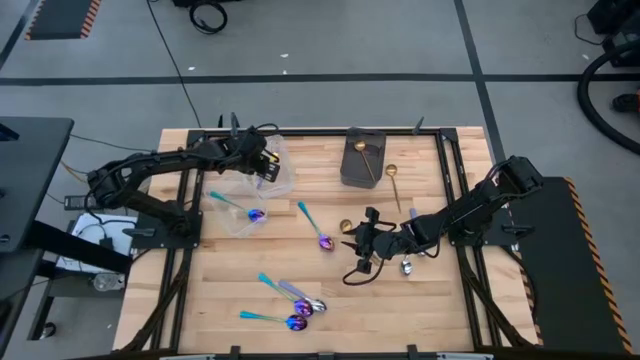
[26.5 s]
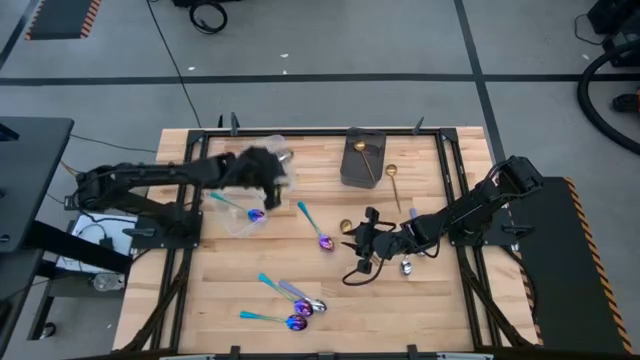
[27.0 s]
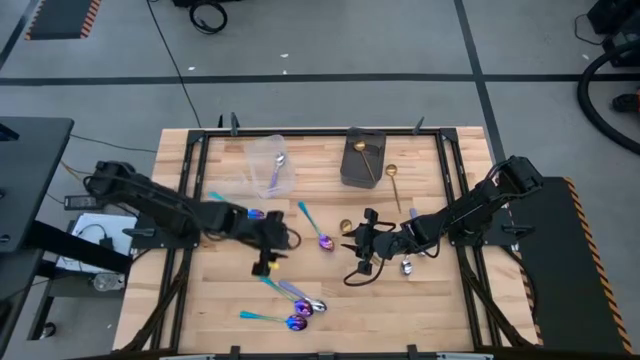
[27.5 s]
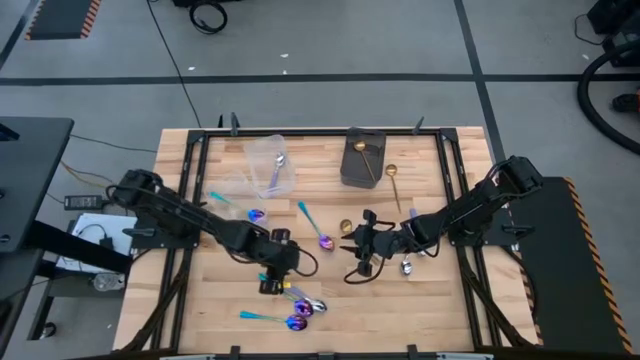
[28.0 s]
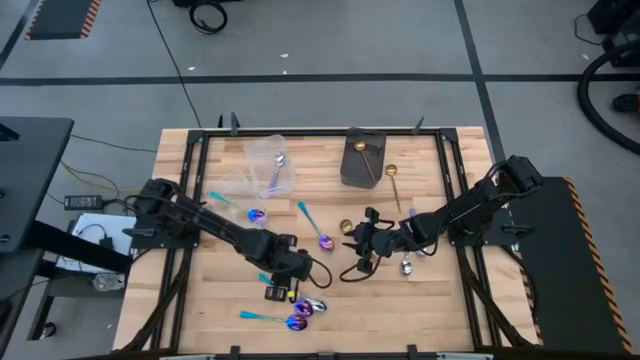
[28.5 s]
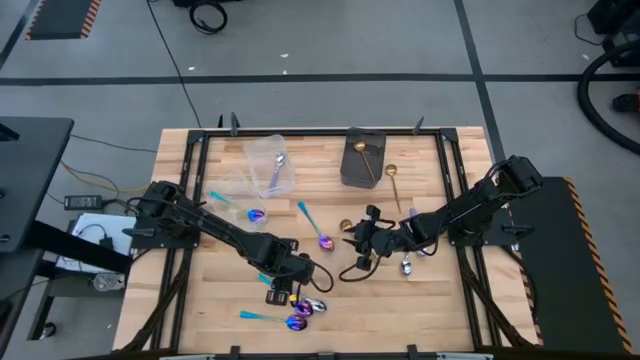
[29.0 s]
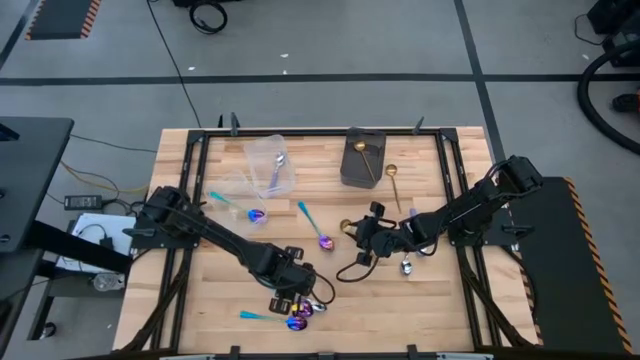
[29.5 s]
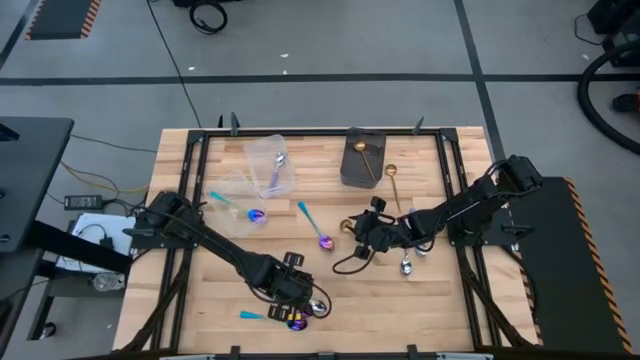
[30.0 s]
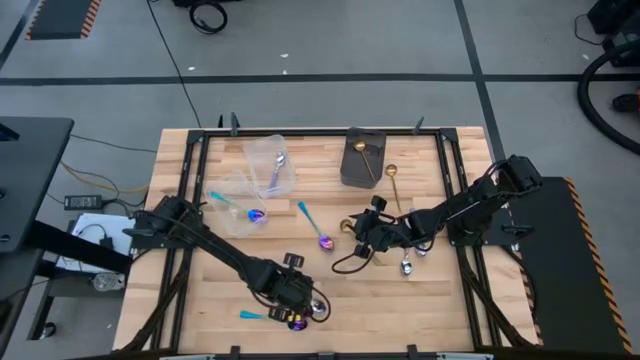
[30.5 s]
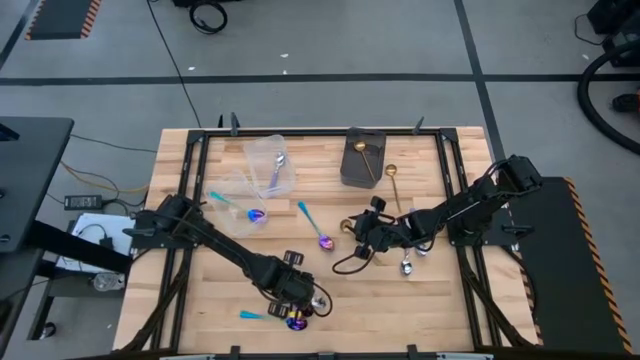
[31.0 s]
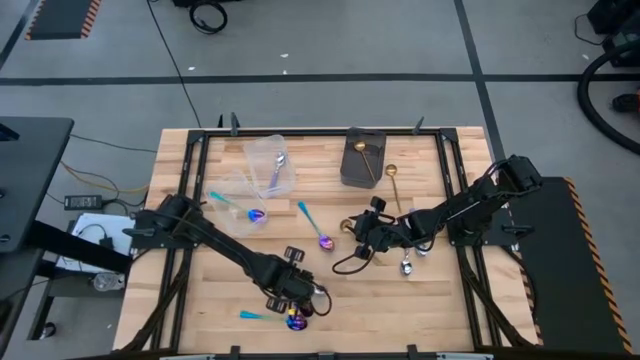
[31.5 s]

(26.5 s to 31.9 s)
Task: Sort silverware by color (type)
Put the purple spoon into the right transparent bin

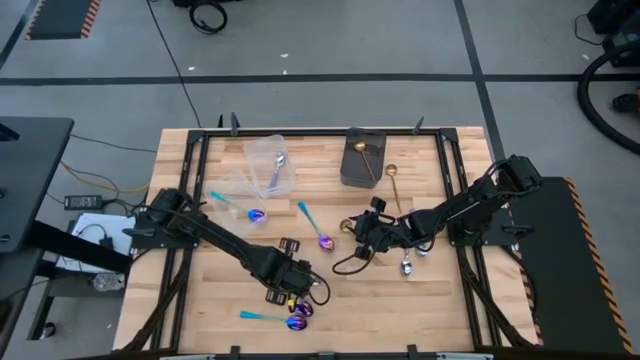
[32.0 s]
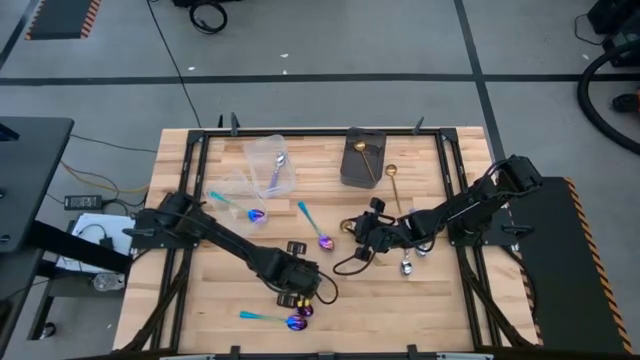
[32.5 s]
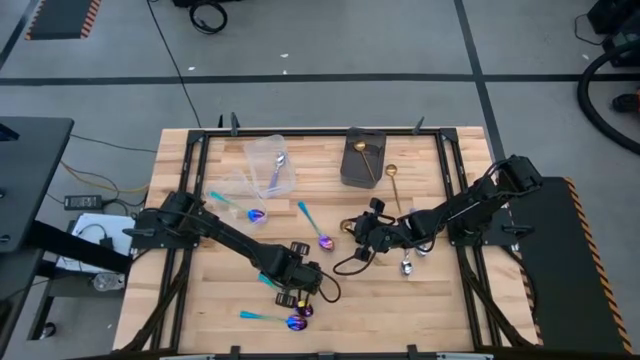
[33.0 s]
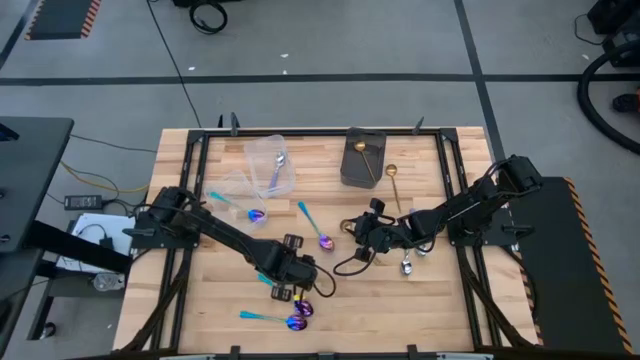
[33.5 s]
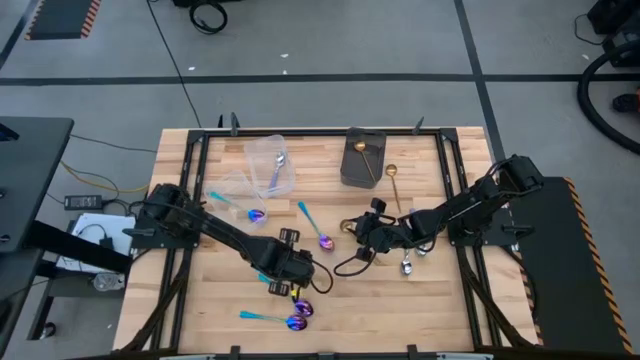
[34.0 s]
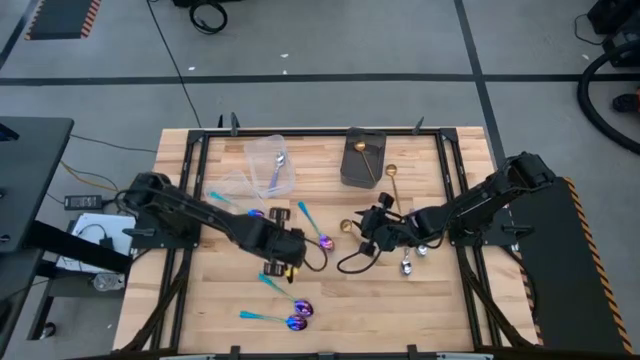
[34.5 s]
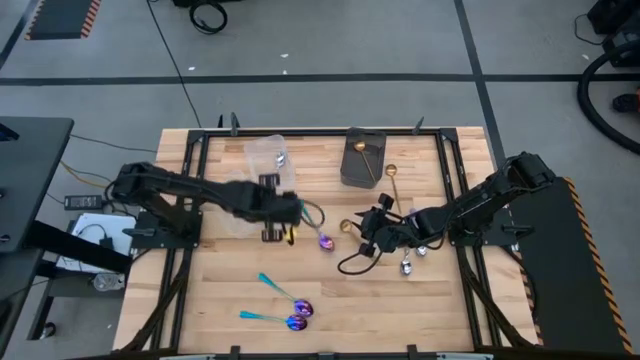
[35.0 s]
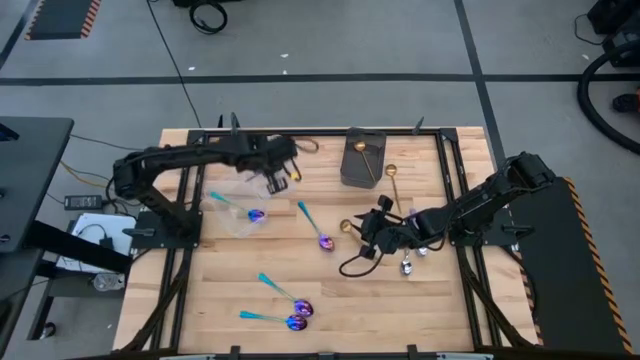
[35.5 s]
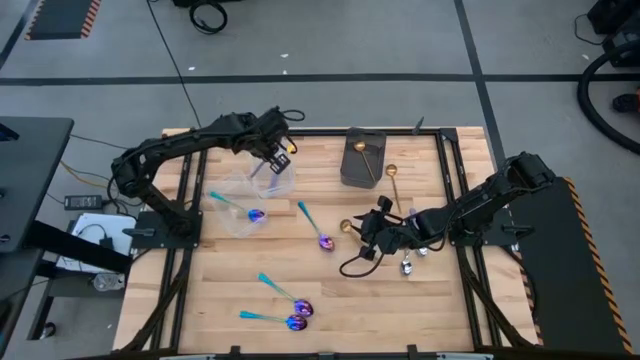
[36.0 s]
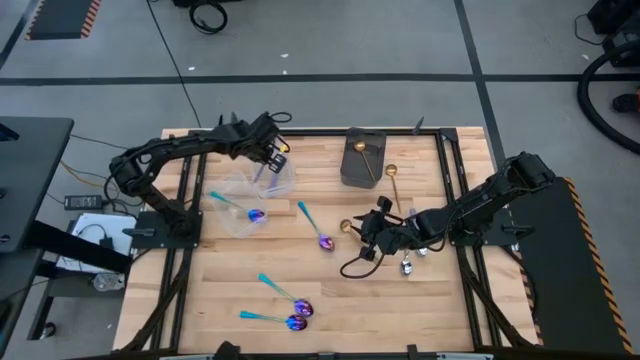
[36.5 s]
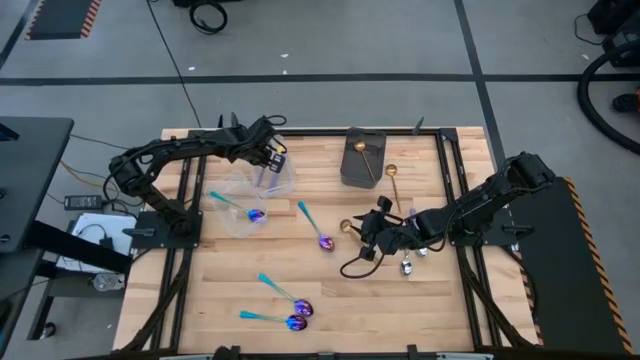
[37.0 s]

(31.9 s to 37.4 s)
Put the purple spoon into the right transparent bin

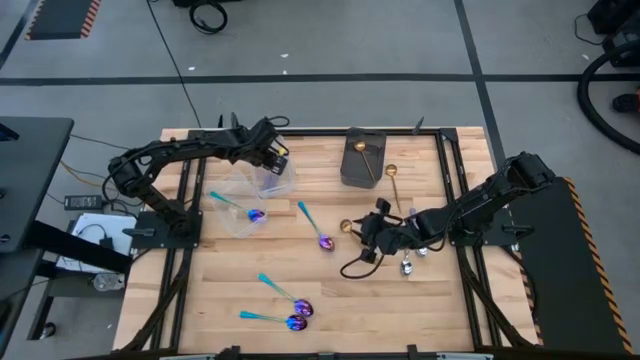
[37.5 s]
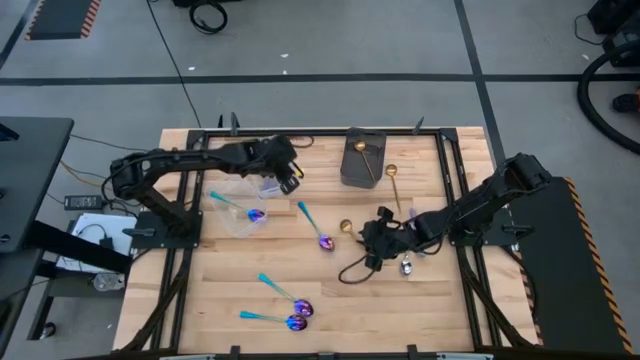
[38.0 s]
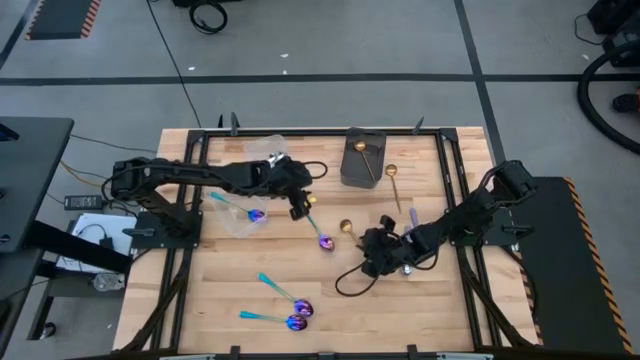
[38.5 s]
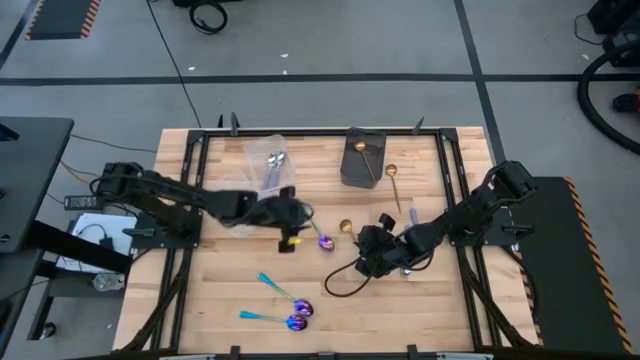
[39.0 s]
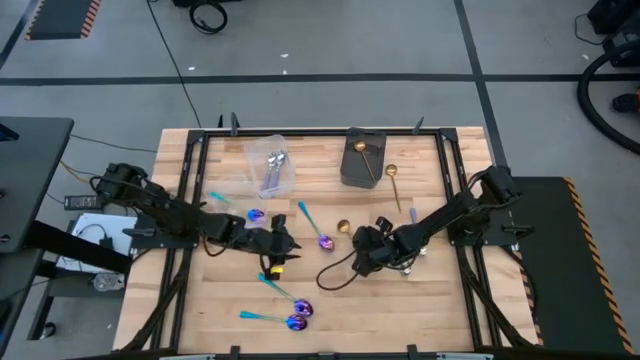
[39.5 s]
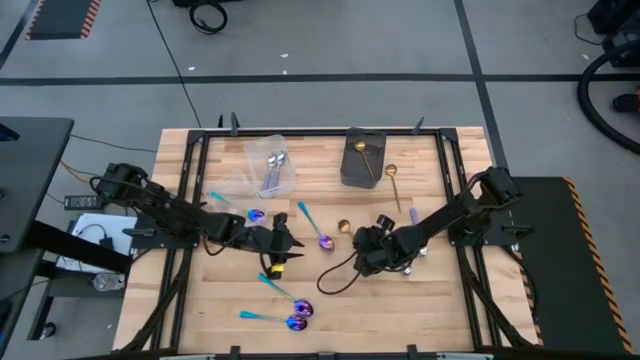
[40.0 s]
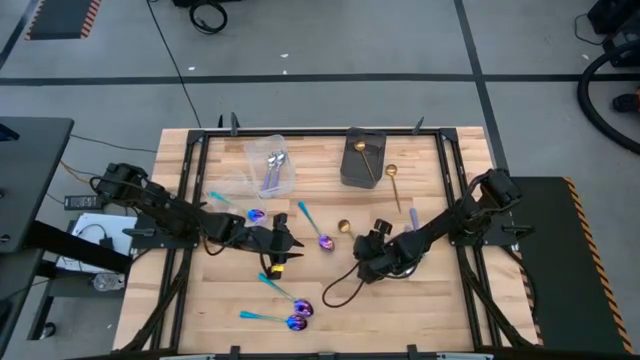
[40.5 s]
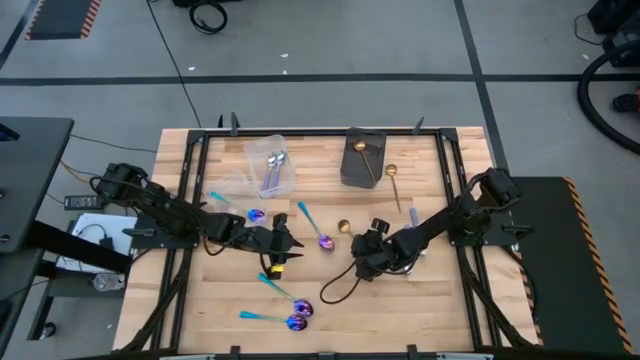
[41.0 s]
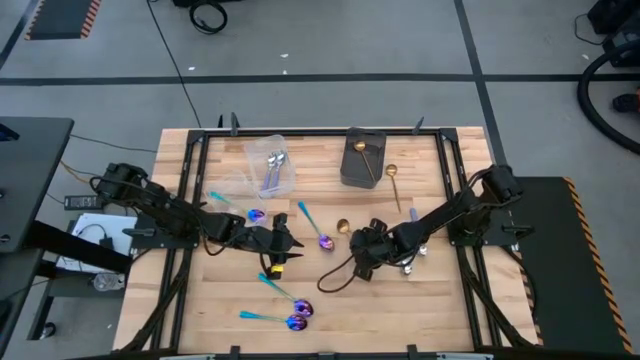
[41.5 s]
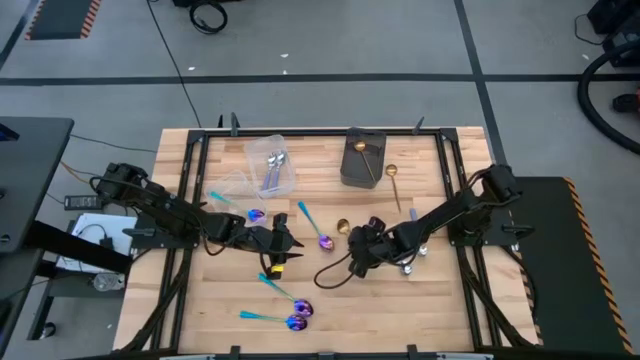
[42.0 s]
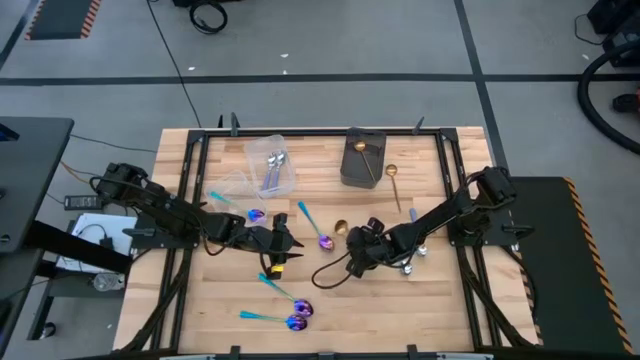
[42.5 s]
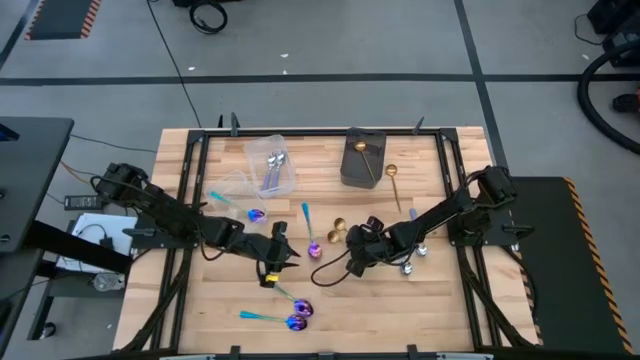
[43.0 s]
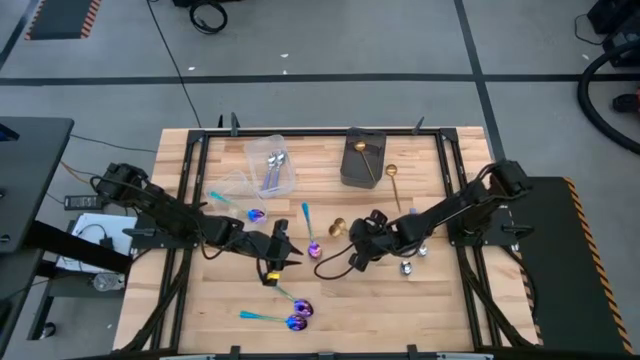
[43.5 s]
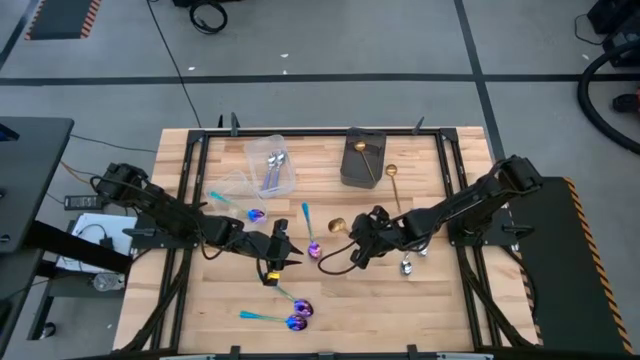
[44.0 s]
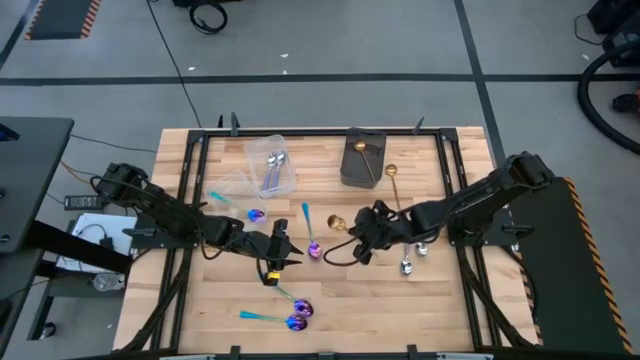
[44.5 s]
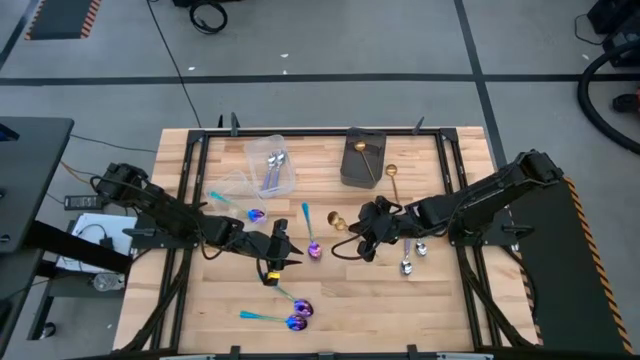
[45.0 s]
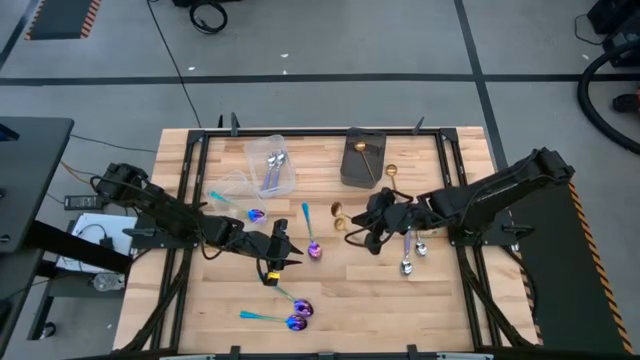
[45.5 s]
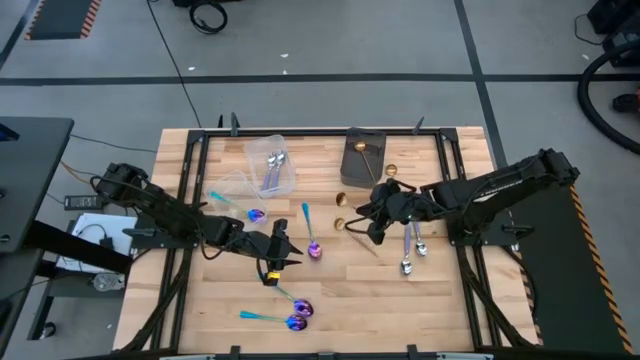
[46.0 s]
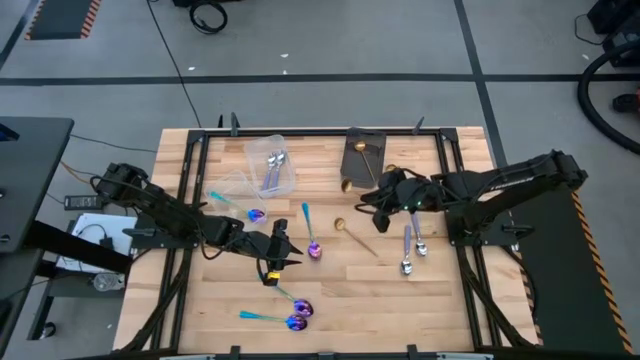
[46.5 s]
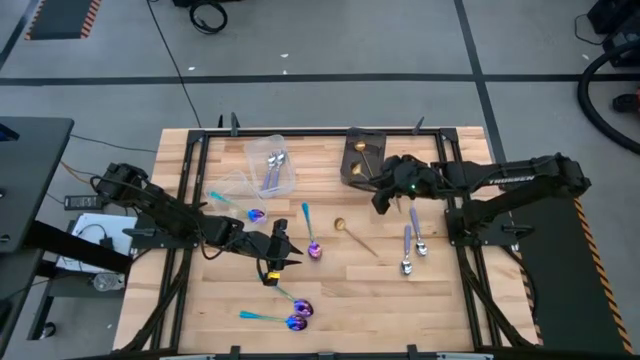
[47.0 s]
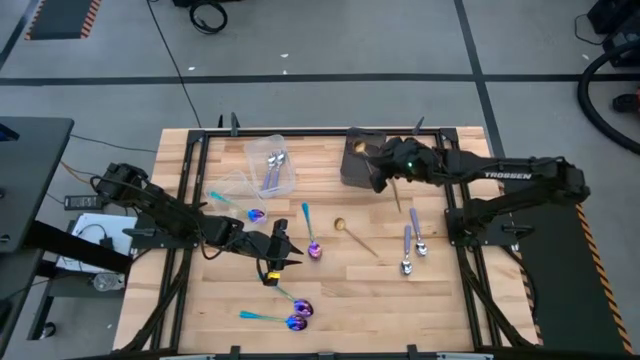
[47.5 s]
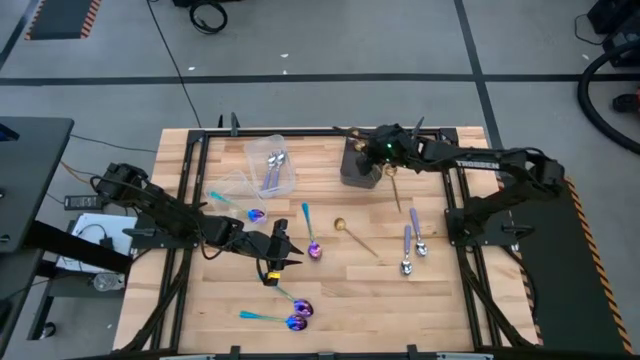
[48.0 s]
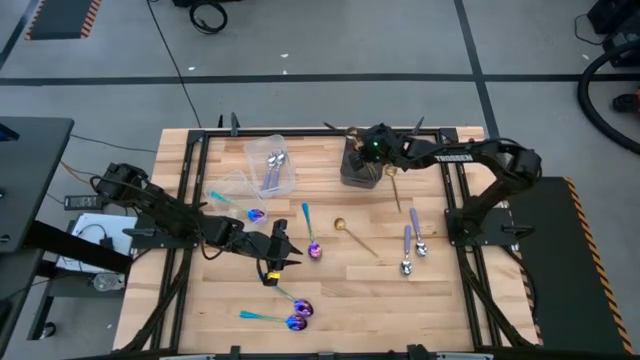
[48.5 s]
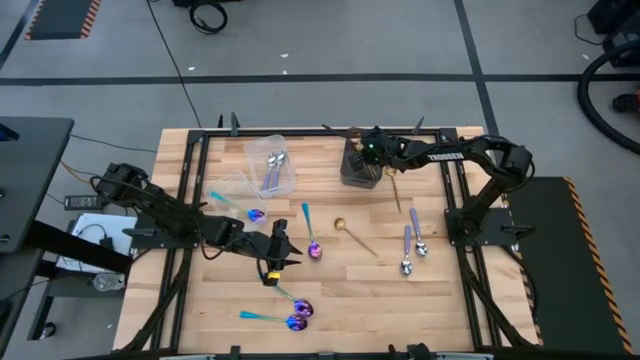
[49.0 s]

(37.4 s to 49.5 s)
Put the gold spoon into the black bin
